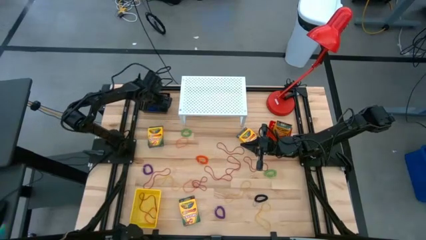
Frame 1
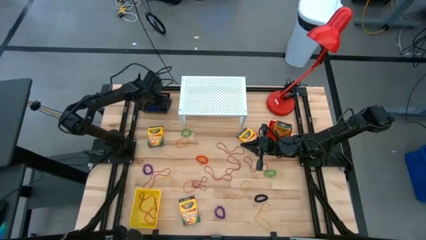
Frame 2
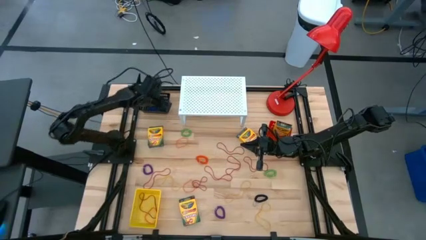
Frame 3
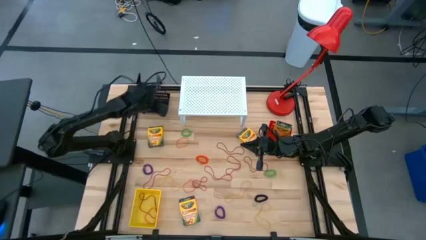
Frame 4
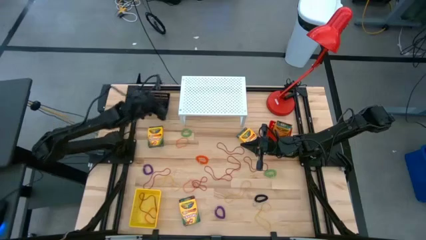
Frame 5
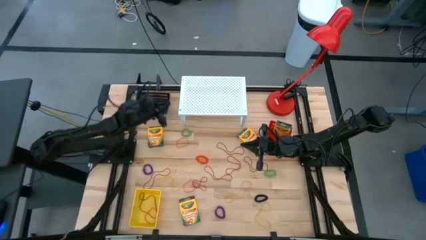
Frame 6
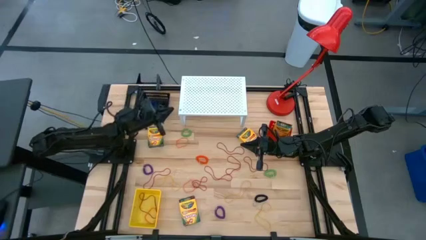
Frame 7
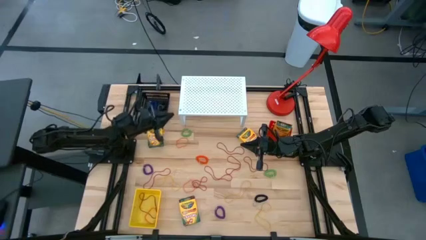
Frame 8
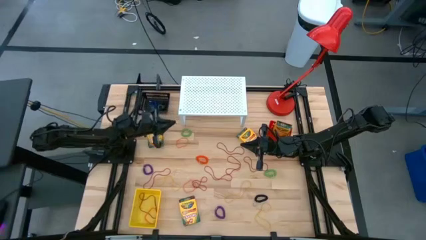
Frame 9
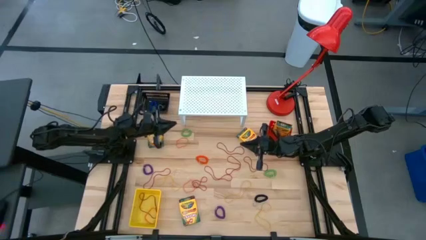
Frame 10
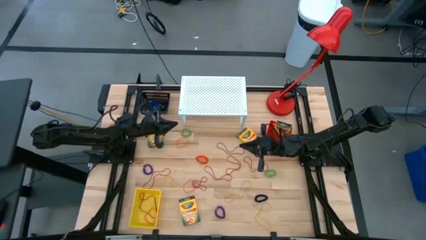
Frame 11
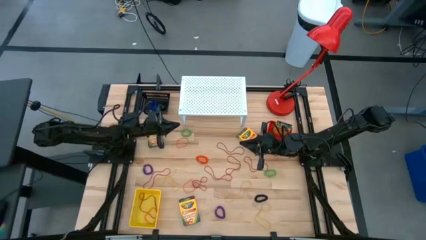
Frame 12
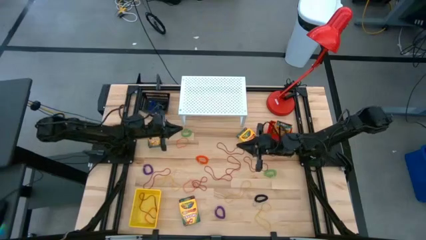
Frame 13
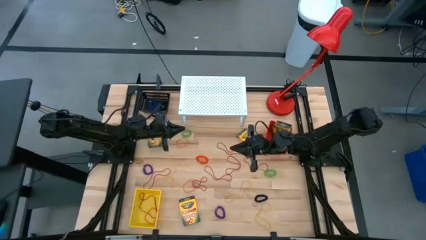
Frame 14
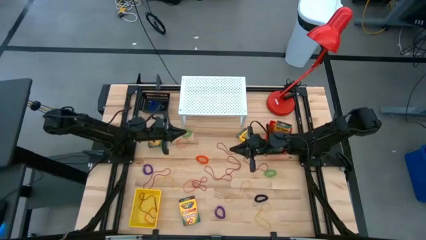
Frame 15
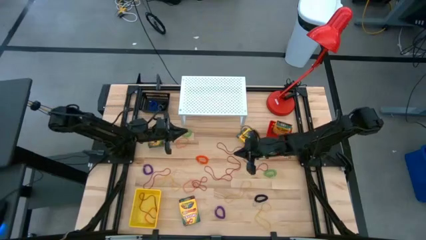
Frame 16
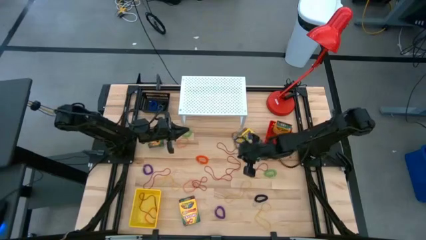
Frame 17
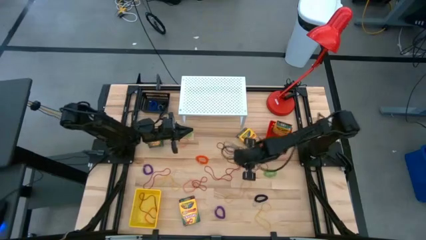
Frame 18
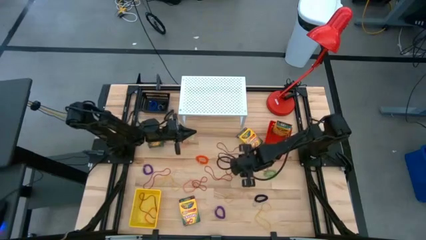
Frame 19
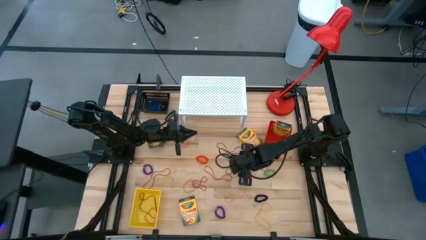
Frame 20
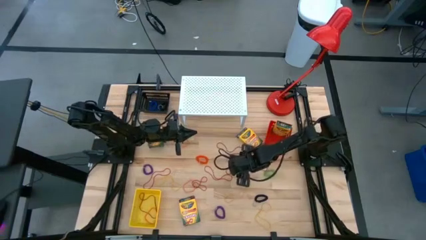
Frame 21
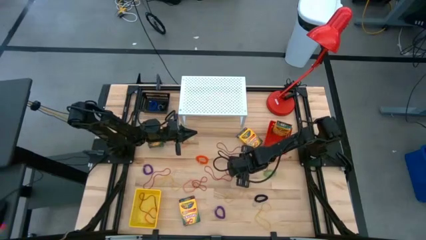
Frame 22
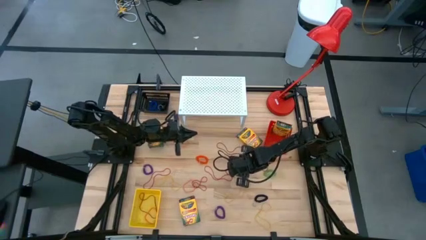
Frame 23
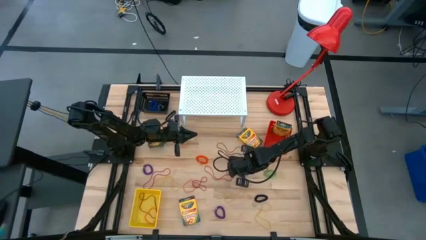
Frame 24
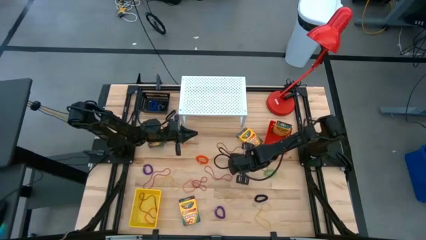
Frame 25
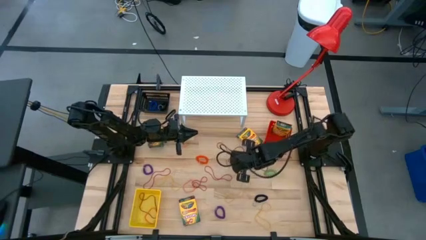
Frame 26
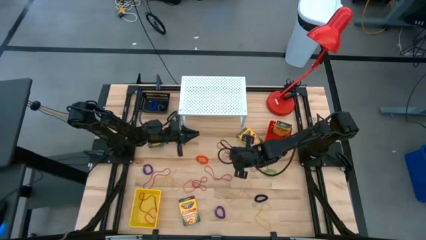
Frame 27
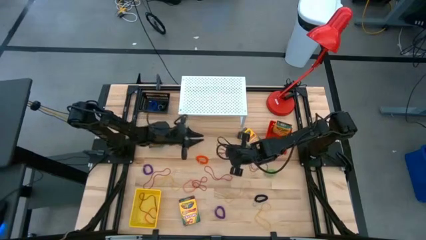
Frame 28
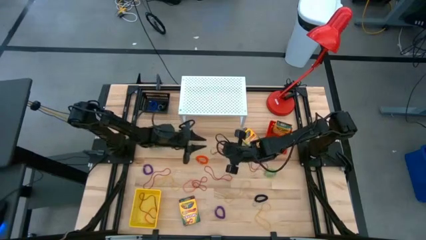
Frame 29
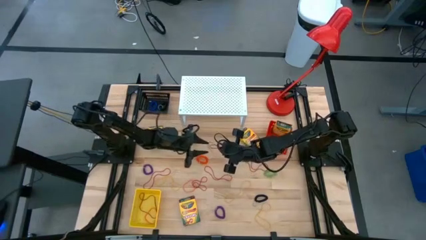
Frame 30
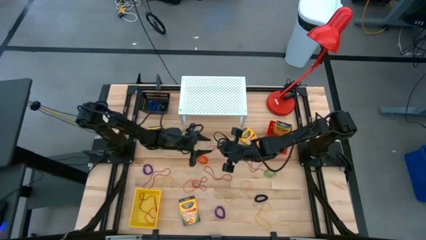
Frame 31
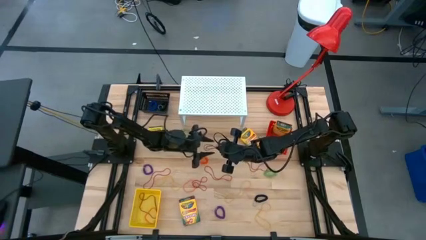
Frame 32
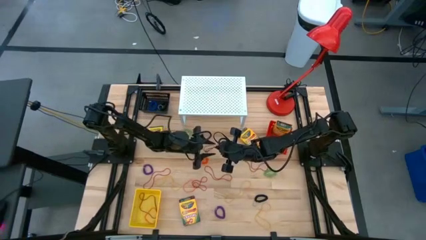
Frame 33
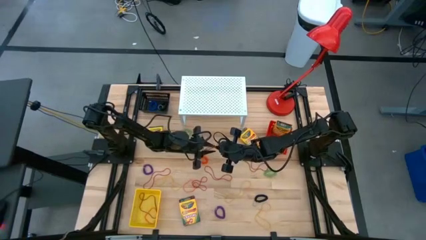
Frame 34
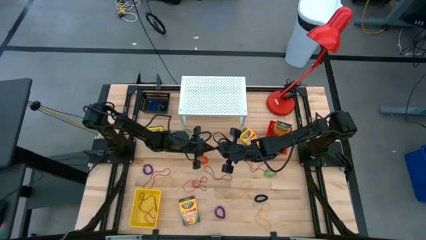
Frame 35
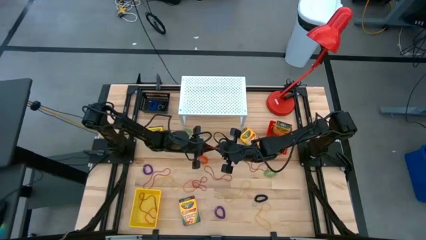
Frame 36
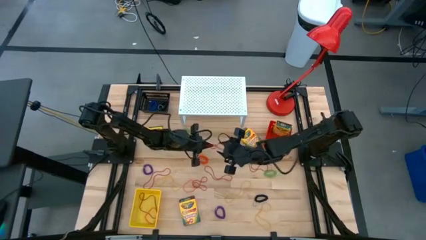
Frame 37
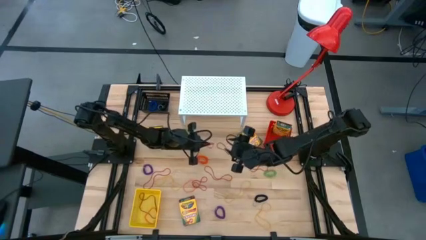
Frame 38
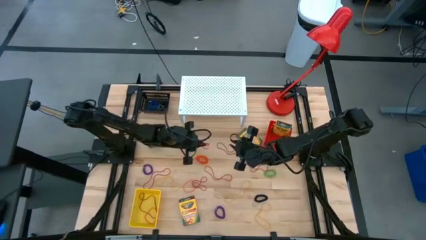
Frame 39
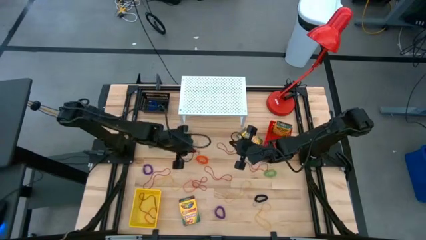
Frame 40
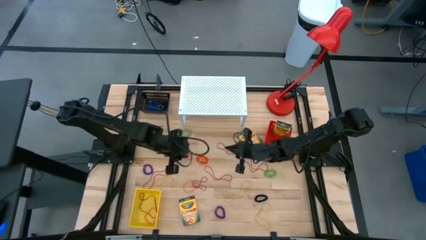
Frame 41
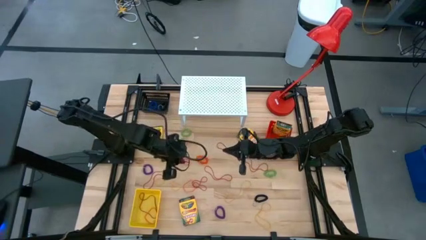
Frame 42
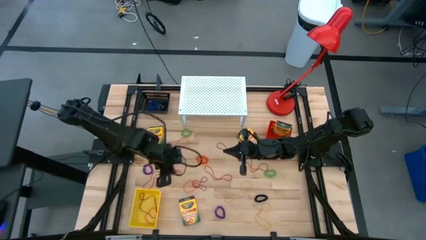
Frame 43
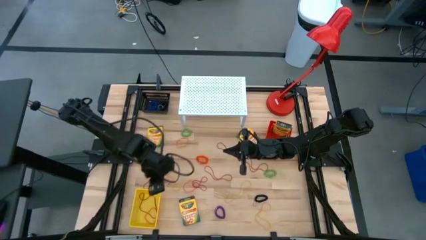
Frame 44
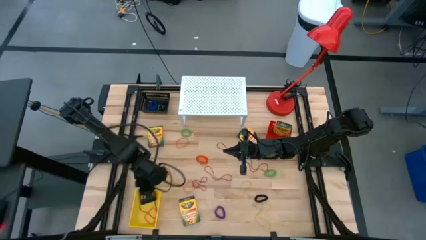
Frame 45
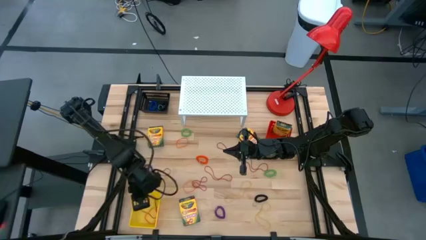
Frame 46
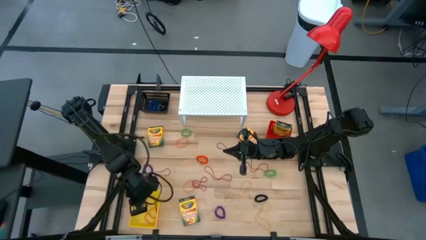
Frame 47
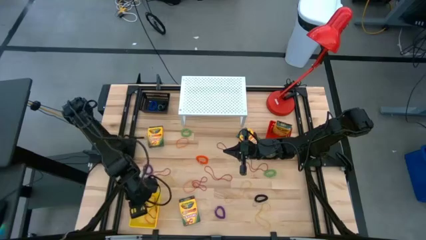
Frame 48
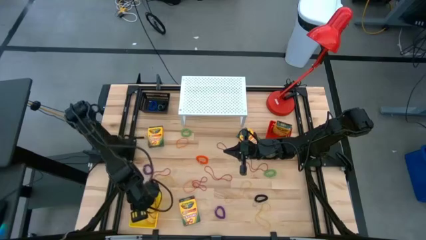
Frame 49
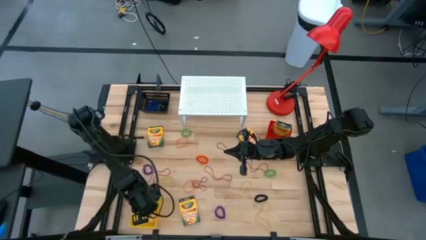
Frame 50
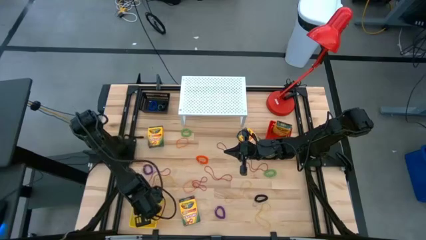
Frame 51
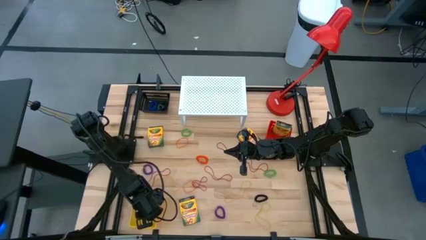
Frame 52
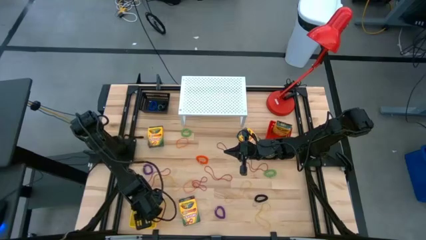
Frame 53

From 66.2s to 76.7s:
Task: Pick & Place Office Desk Supplies
Put the red rubber band into the yellow bin

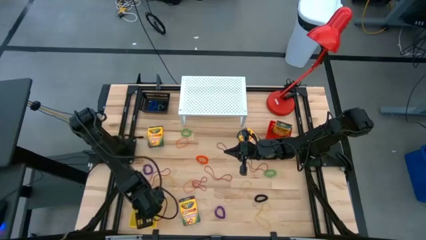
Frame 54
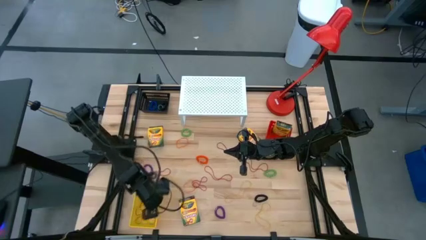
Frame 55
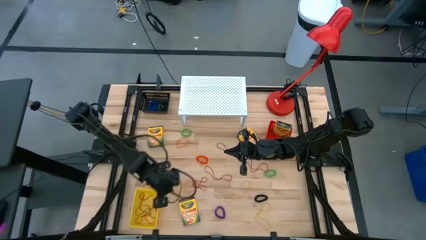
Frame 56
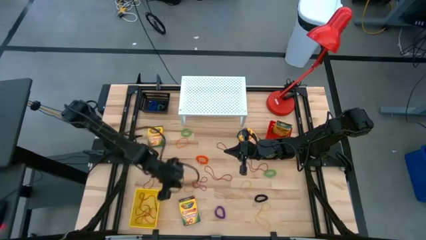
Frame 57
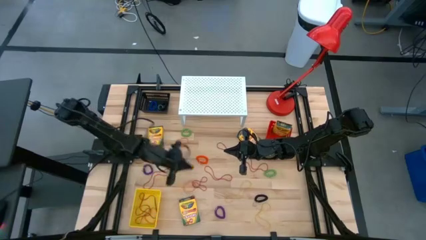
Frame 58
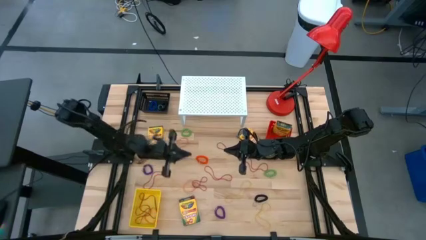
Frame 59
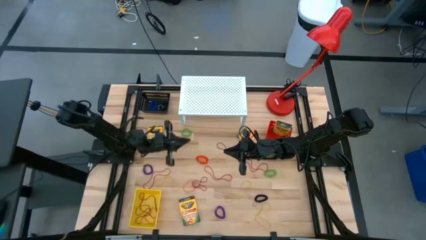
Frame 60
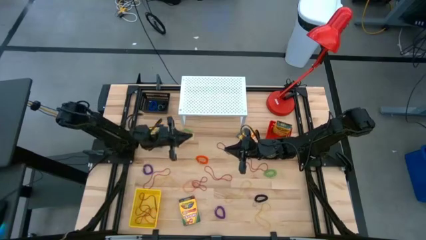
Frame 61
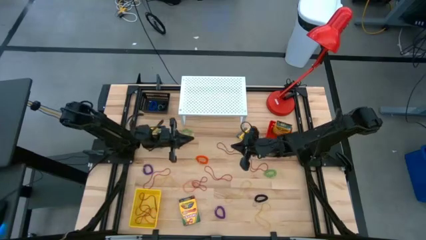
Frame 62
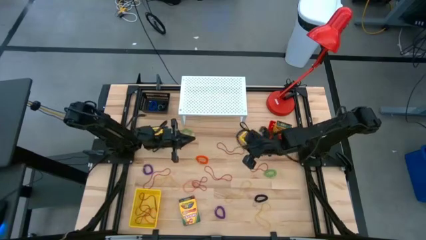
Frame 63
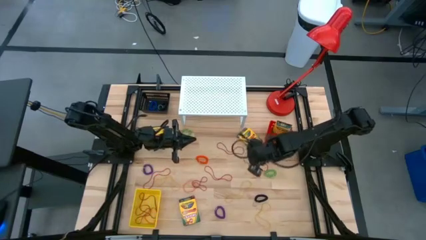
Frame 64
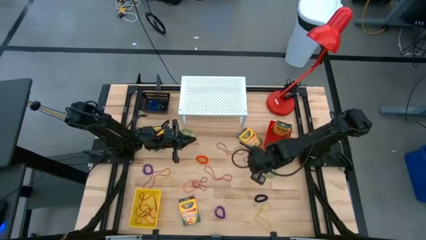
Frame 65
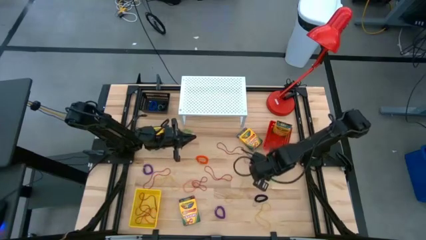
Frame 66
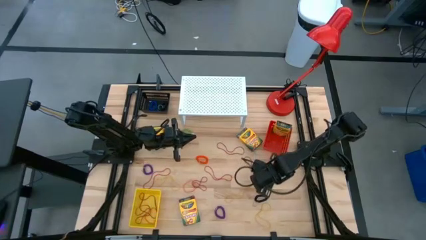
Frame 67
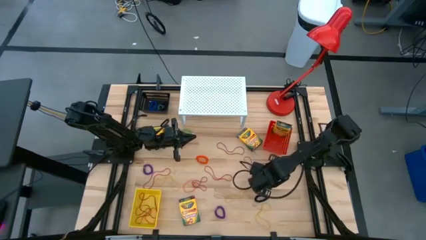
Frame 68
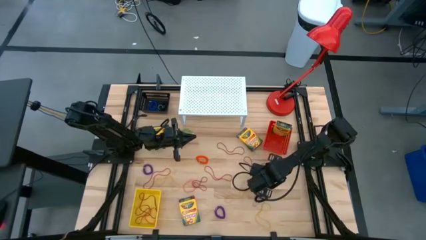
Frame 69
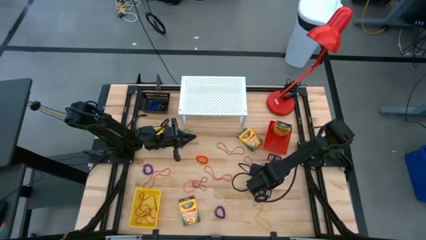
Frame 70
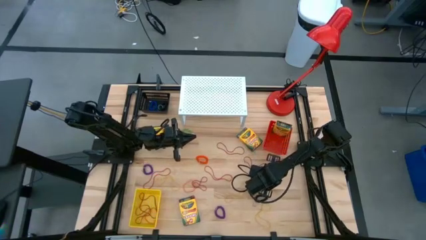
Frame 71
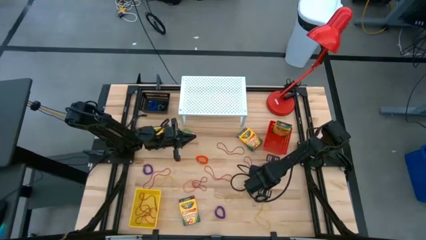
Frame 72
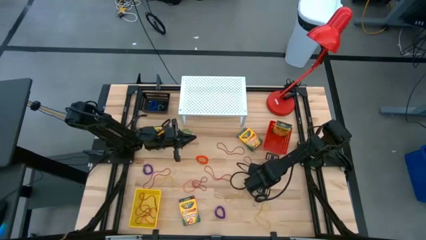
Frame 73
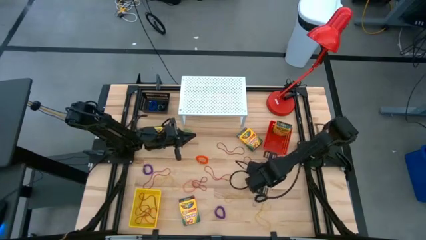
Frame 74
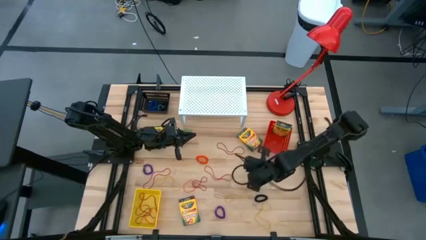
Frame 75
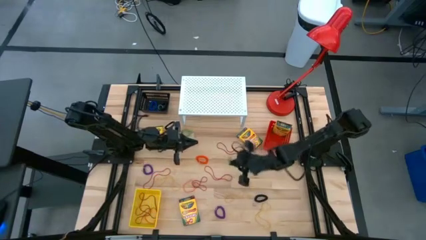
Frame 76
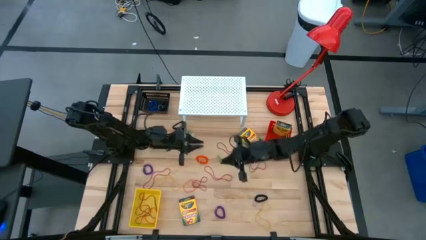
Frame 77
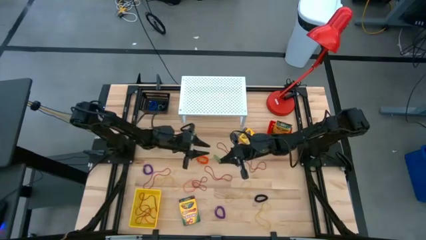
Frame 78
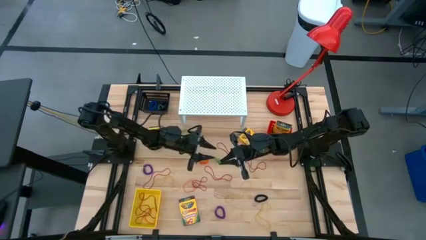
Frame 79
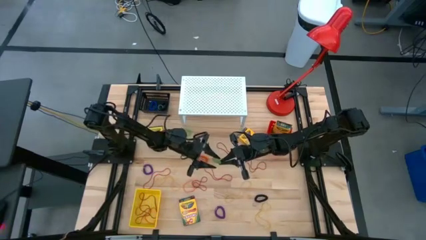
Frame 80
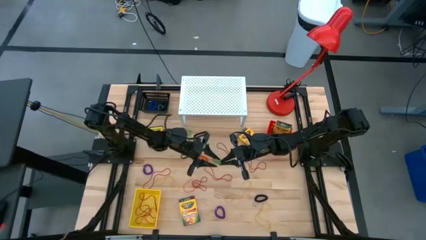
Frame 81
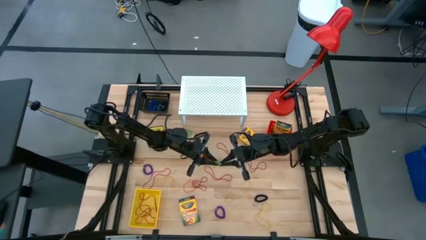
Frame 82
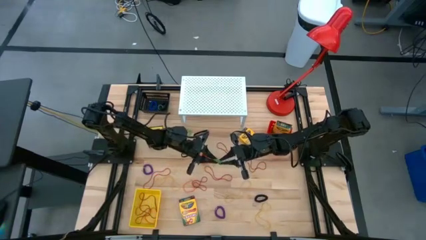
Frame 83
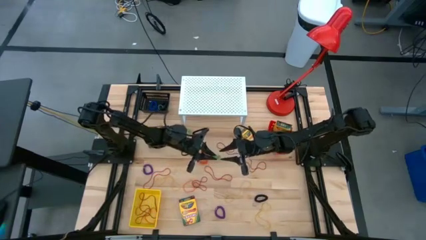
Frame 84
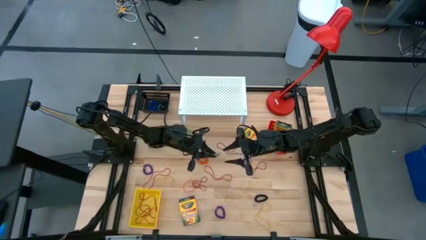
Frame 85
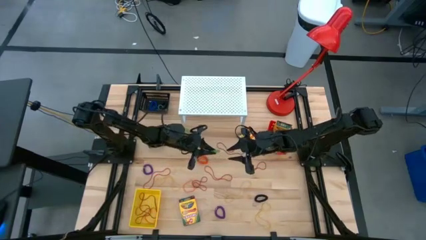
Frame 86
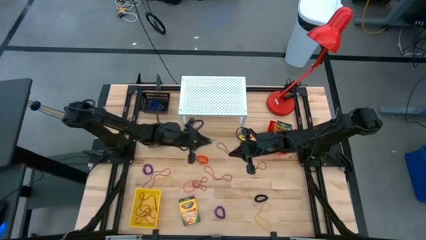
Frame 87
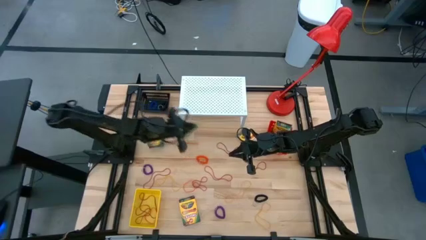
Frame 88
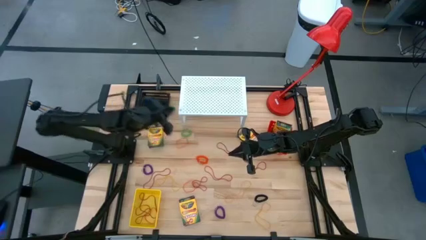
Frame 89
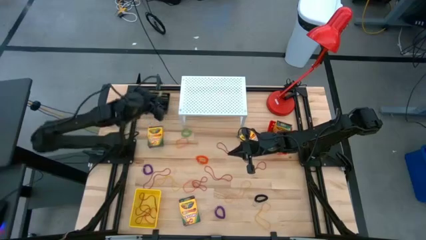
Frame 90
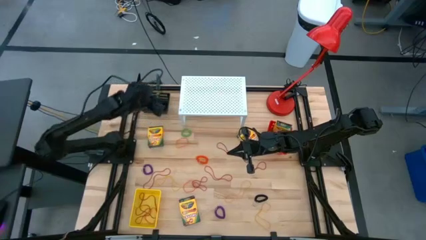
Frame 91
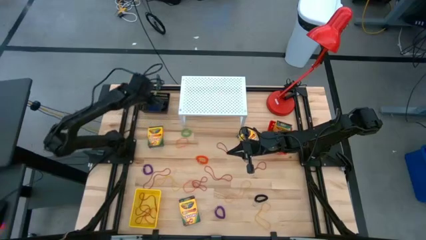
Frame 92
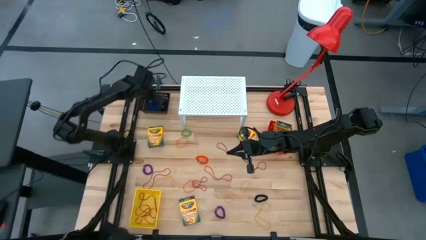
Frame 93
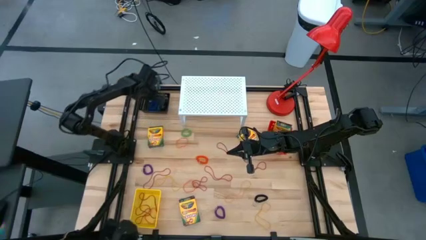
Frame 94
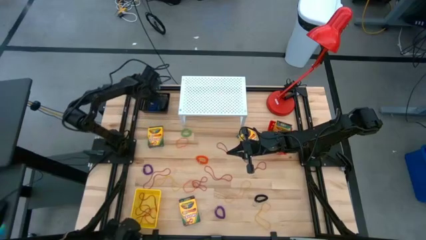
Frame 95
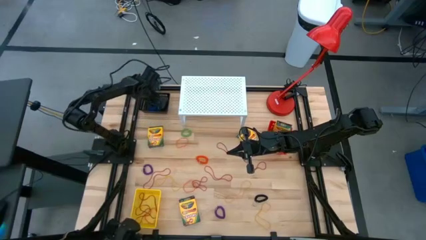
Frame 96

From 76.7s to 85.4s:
Put the right green spring rubber band into the black bin
